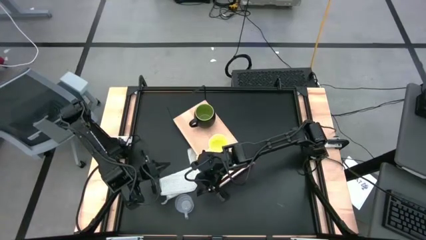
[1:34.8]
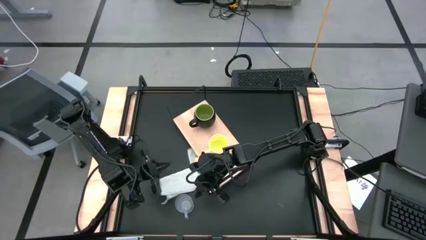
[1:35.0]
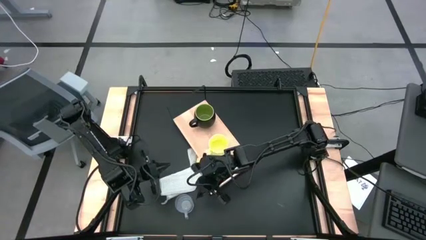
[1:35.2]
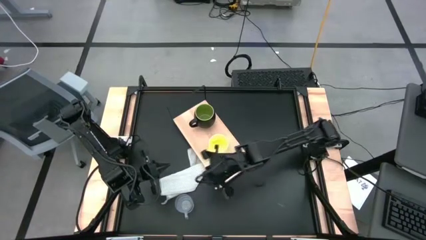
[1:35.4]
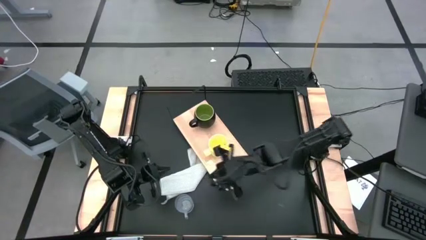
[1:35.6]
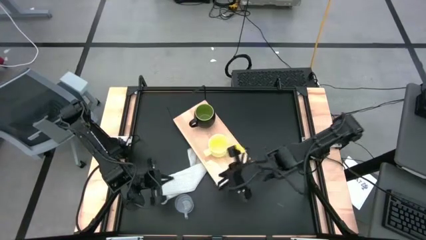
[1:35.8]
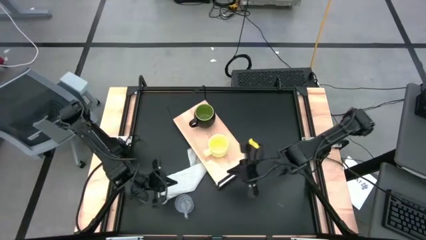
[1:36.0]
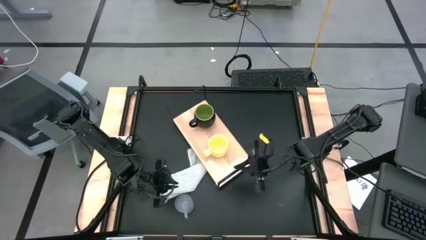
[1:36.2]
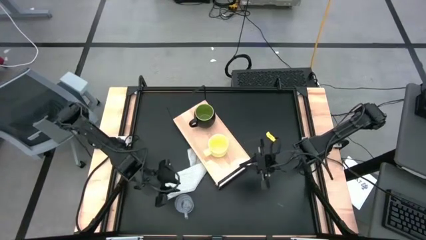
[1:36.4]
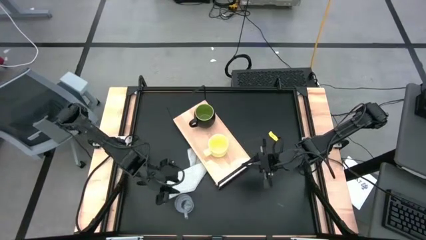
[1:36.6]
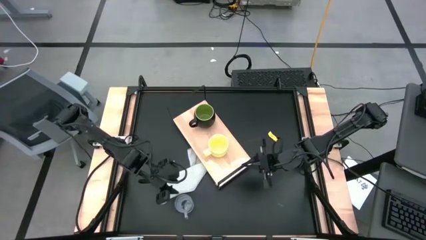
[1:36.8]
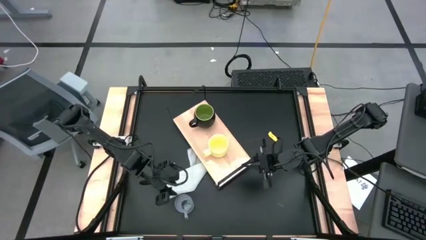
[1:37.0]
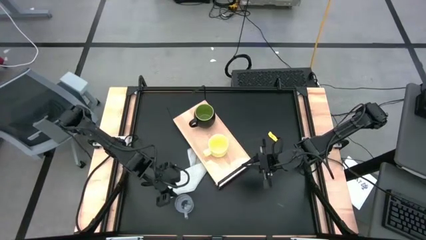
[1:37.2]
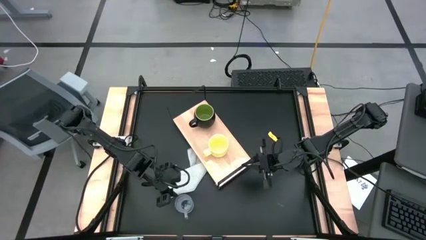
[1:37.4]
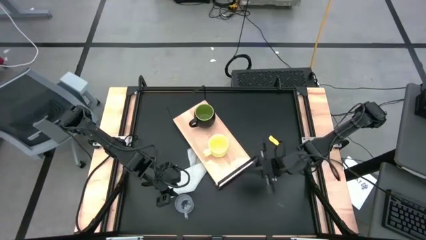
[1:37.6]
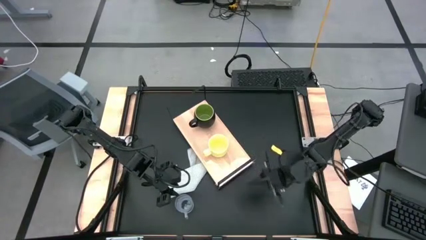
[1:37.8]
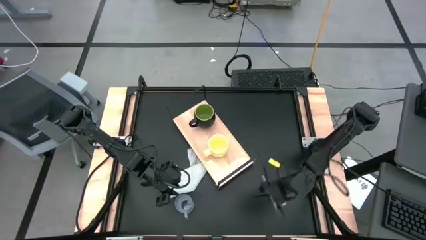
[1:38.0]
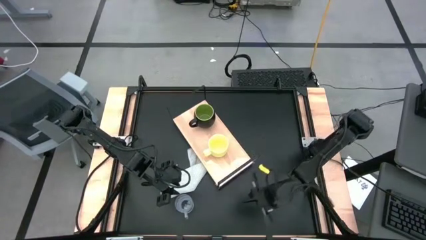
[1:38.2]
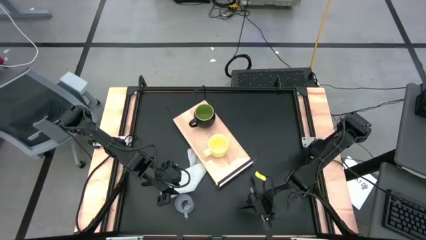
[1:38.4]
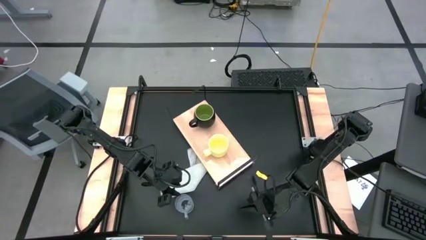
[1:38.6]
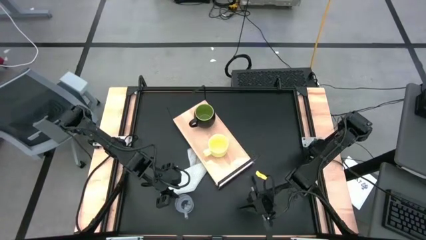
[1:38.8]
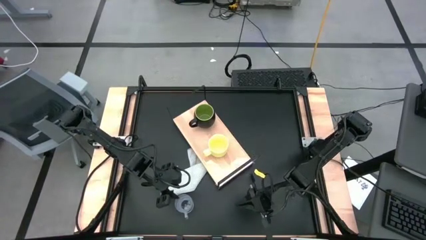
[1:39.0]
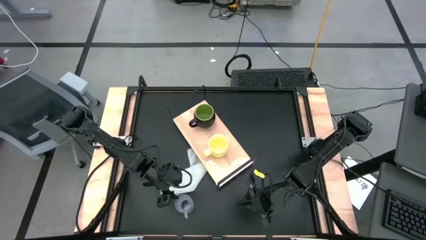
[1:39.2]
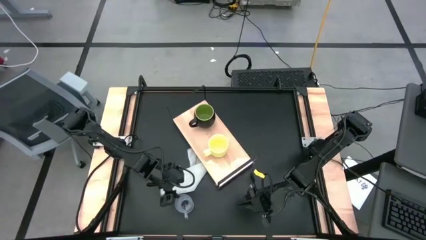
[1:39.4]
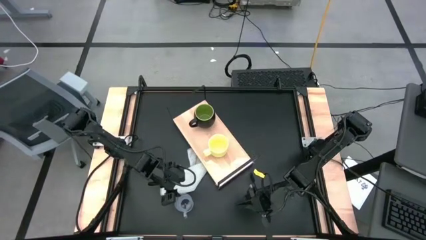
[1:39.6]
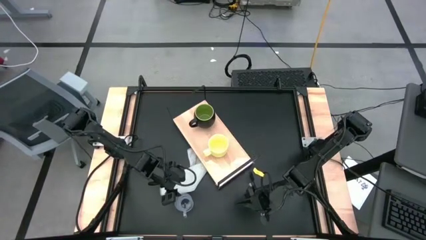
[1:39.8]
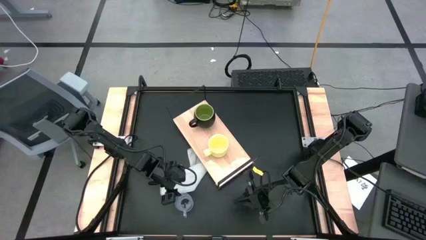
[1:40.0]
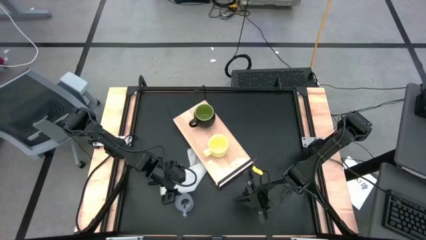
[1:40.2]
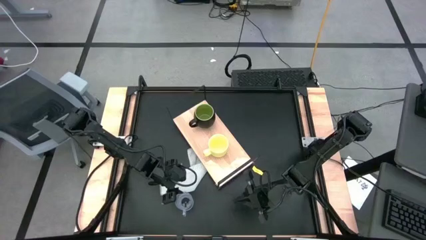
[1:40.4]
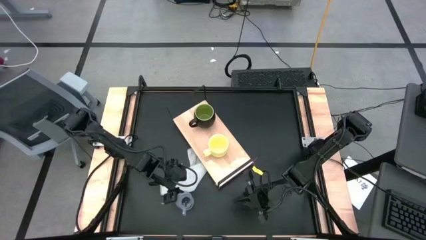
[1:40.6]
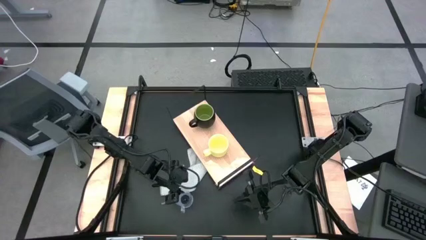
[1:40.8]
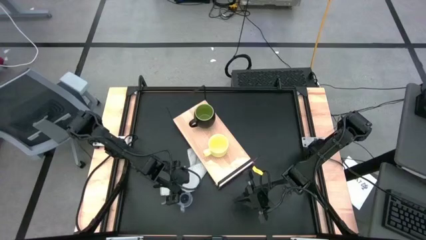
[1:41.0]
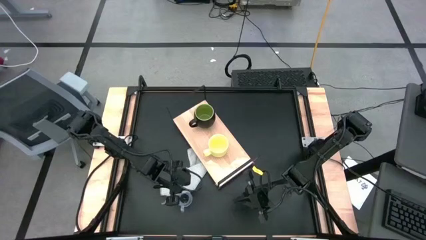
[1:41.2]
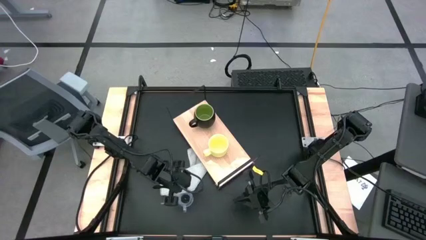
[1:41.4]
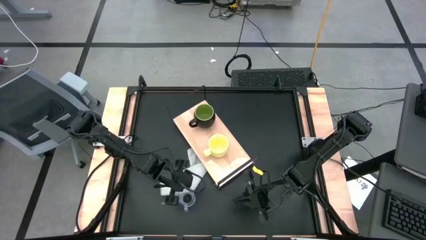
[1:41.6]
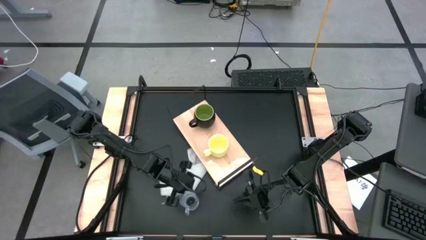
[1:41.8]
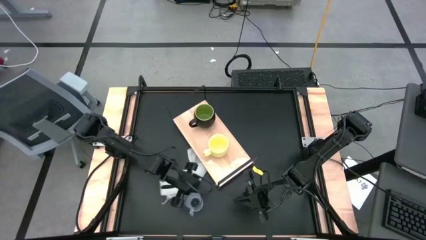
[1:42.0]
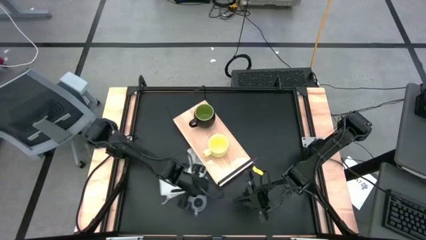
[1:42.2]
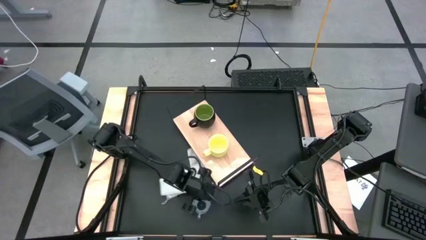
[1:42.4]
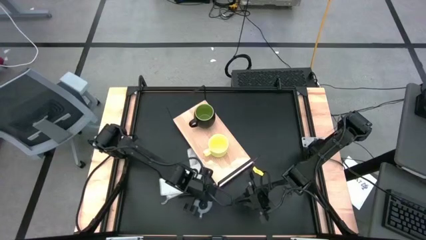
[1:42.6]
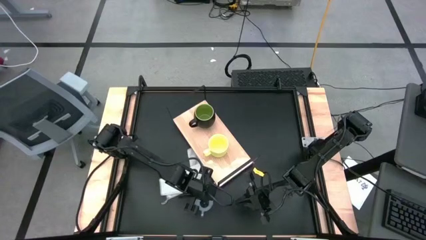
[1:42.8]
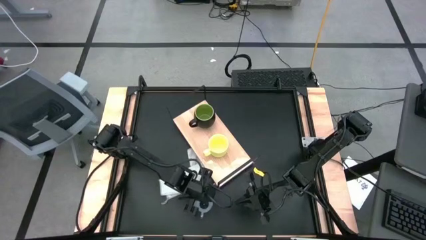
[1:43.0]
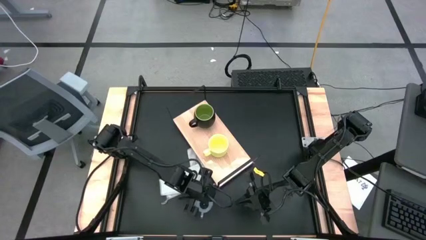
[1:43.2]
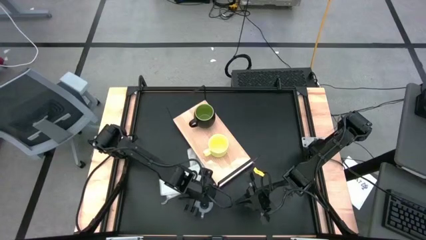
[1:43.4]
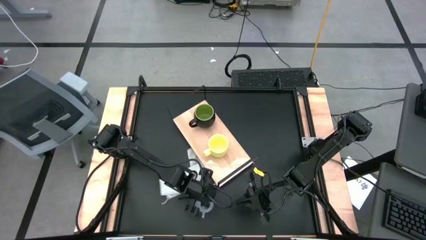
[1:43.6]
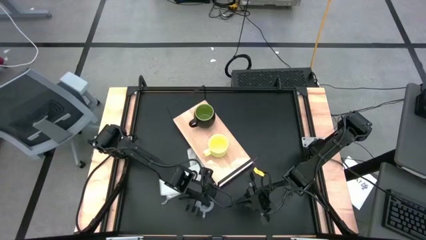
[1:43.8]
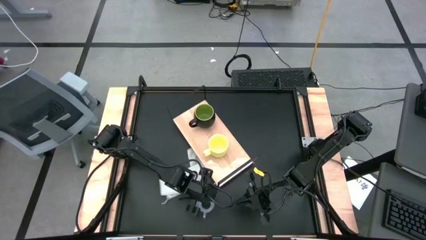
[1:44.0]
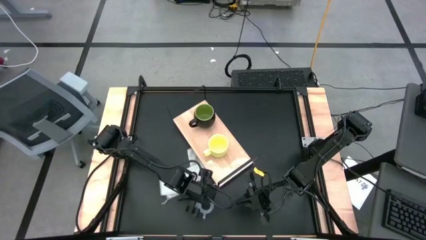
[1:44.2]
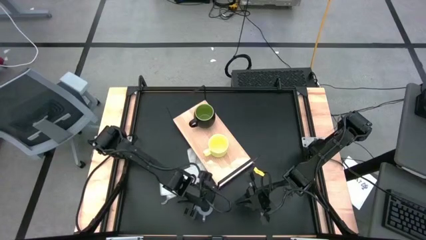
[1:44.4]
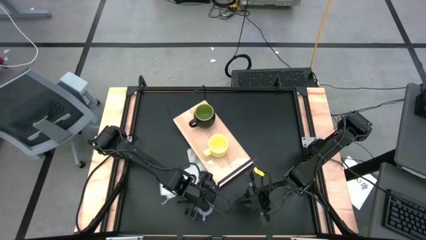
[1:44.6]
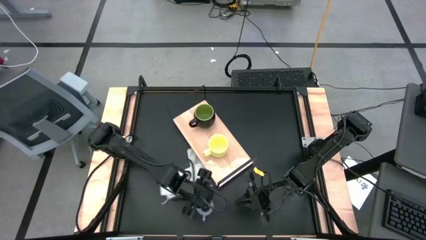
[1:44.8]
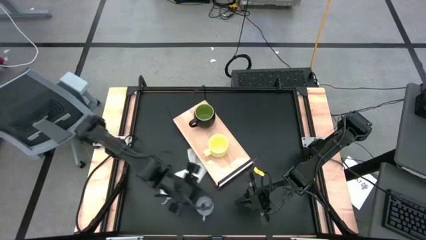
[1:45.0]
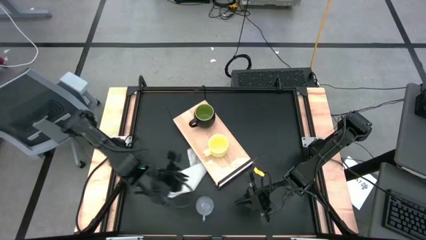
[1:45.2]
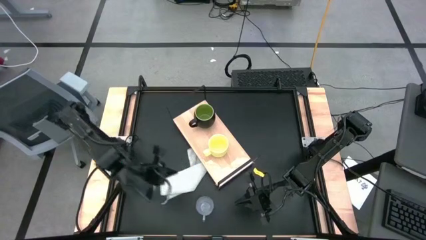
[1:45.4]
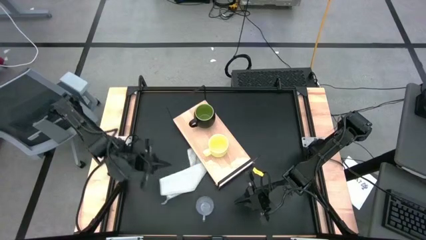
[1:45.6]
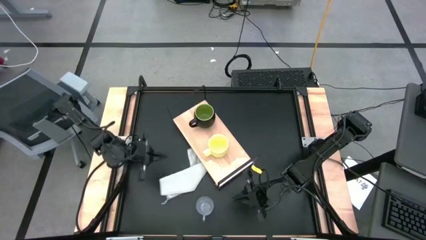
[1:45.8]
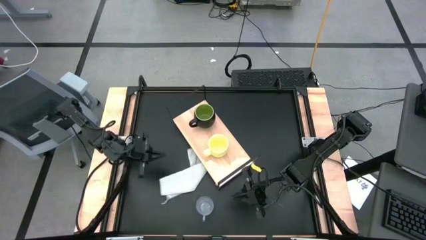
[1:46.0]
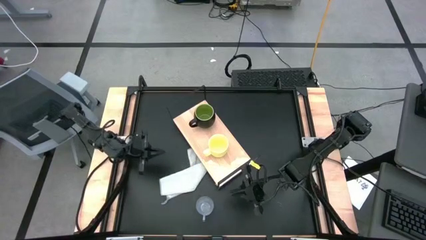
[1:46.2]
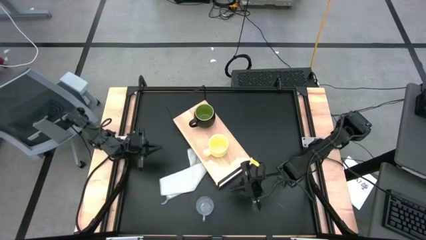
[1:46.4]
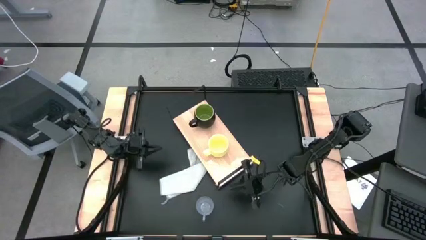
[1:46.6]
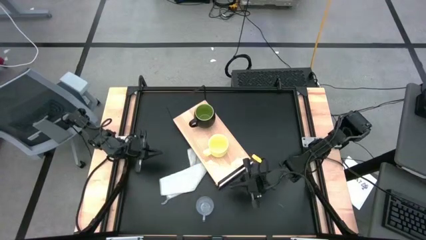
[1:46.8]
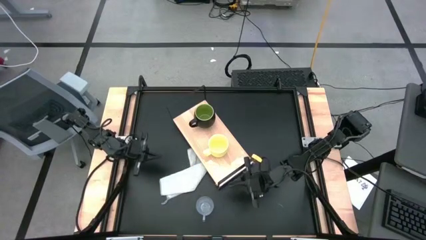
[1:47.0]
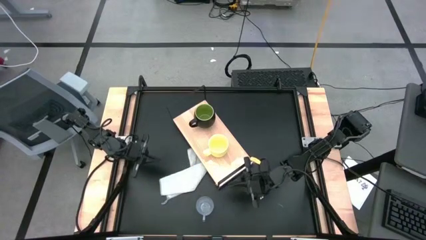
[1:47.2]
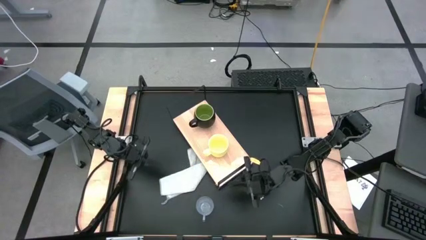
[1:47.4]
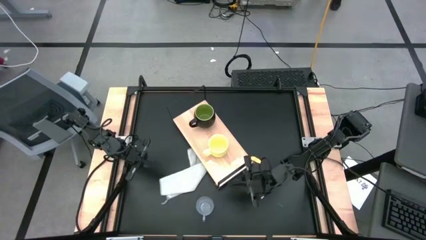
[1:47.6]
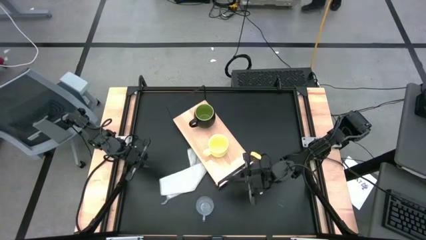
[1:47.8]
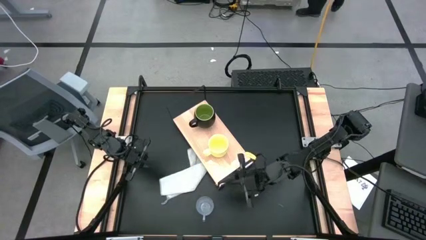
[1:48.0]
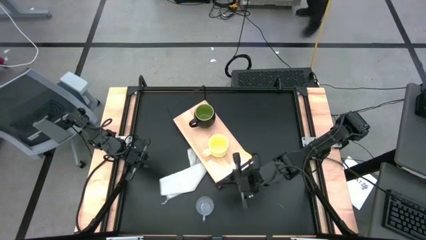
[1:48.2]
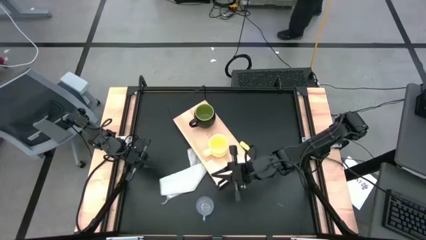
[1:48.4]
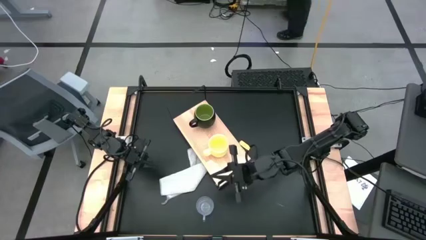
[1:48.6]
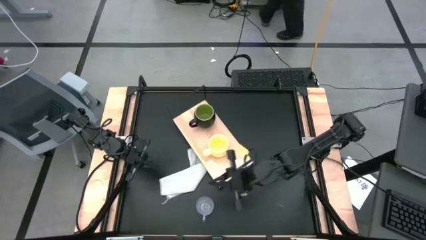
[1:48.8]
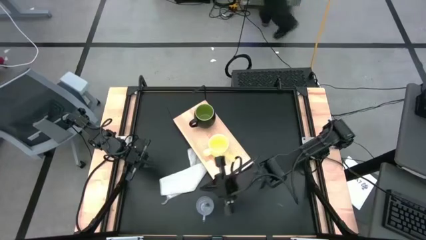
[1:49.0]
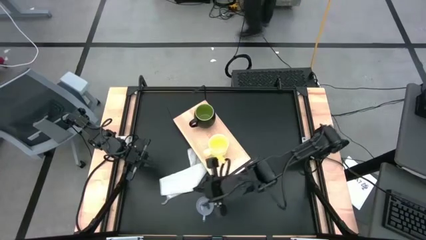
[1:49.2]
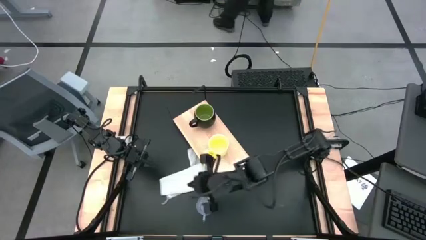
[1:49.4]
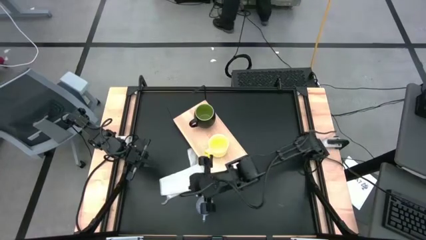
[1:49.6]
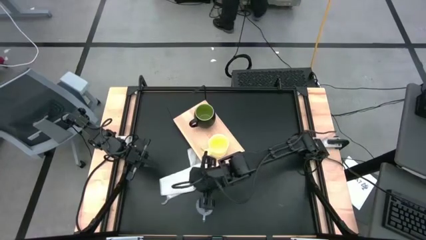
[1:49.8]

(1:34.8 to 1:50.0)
Task: Stack small to large cups/mugs on shelf
Put the transparent mug on the shelf

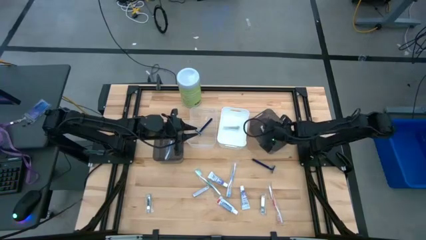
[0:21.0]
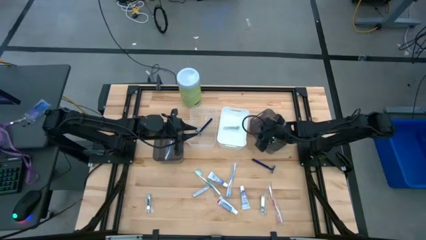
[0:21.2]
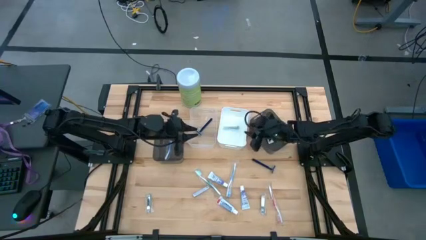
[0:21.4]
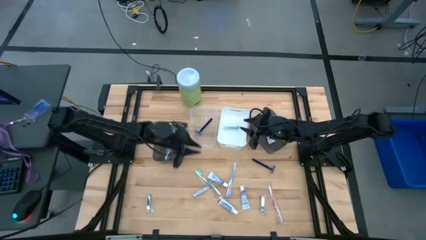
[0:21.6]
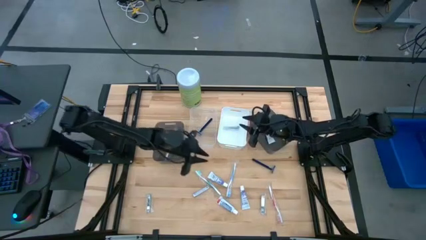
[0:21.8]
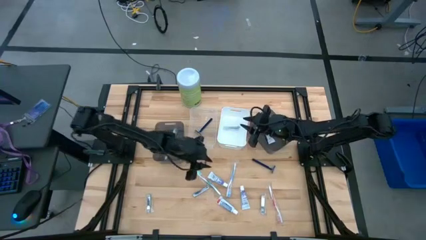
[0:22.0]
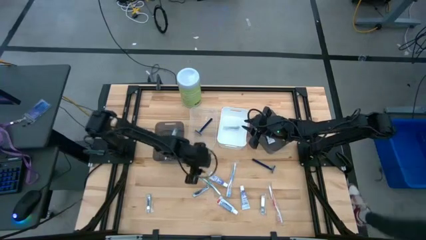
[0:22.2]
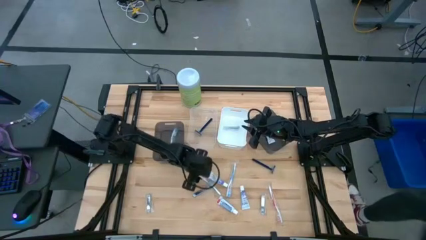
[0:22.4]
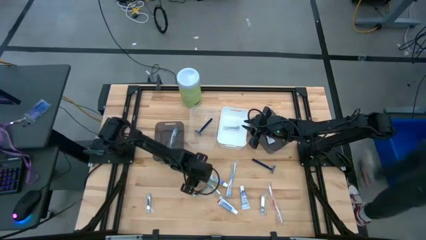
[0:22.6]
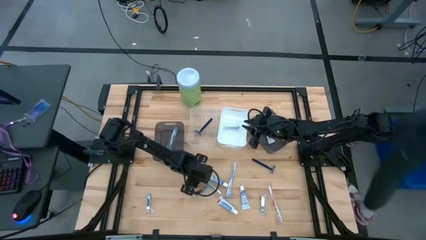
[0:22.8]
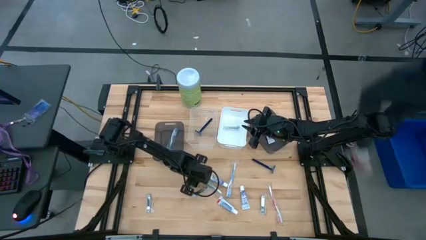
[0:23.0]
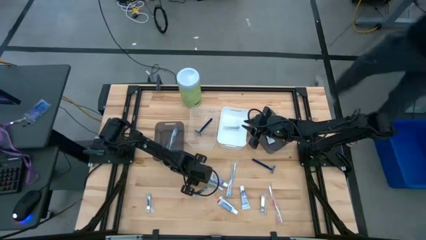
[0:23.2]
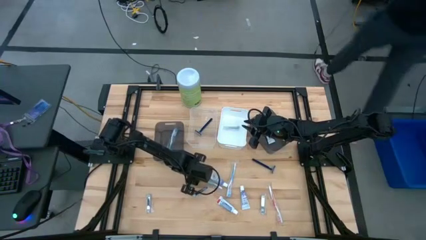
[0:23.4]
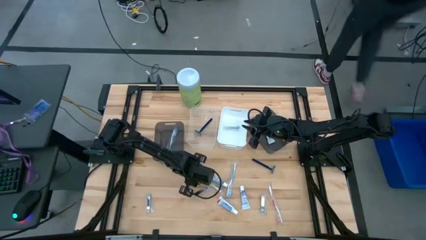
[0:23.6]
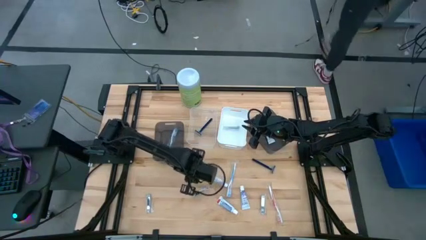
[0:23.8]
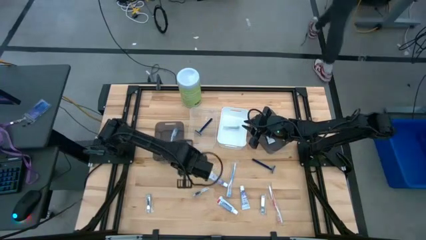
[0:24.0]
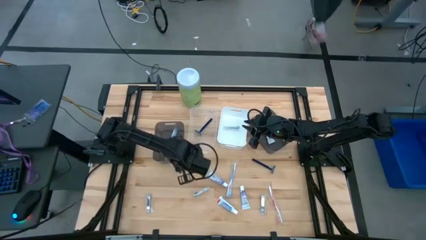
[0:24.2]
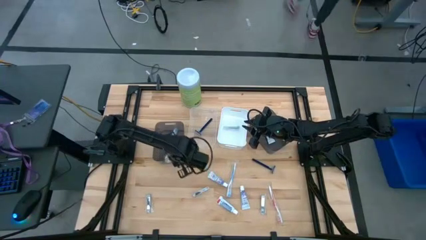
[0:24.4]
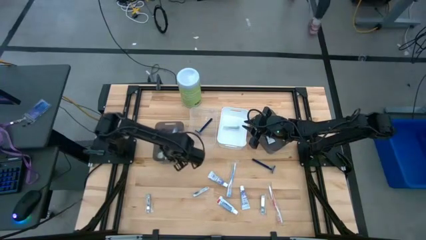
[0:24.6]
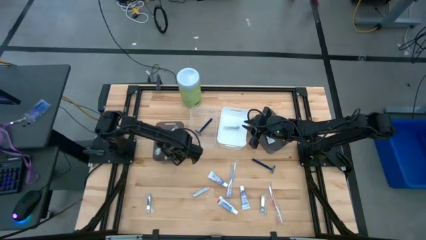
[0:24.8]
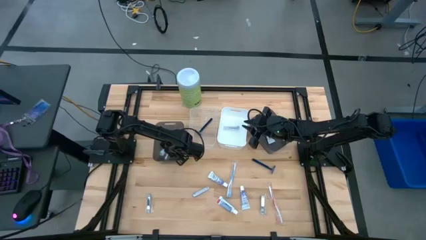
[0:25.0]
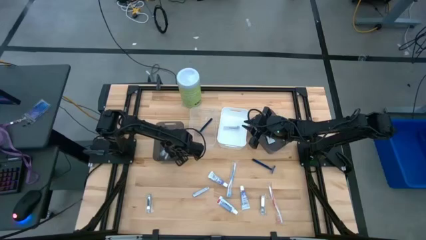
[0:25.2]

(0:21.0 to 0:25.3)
Task: Pick & Place Travel size toiletries
Put the green toothbrush into the left black bin
